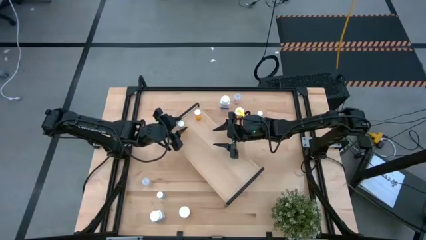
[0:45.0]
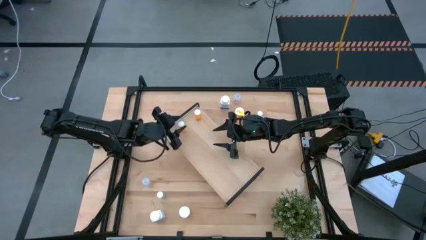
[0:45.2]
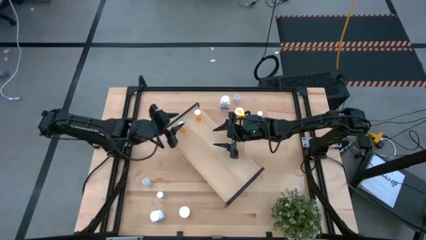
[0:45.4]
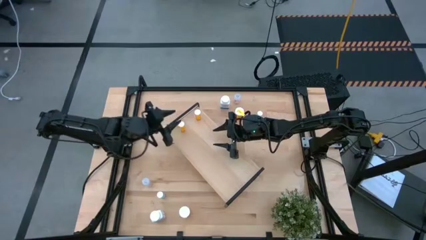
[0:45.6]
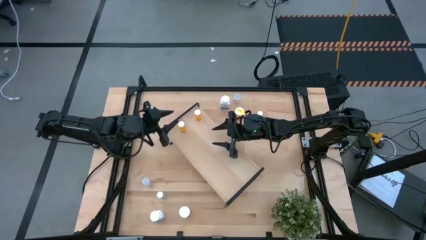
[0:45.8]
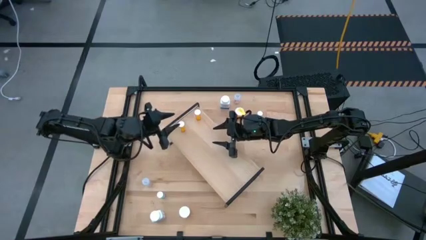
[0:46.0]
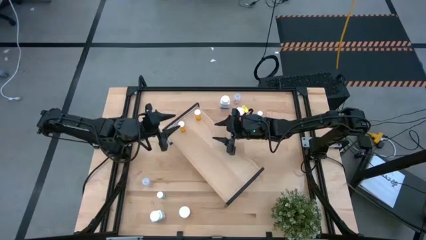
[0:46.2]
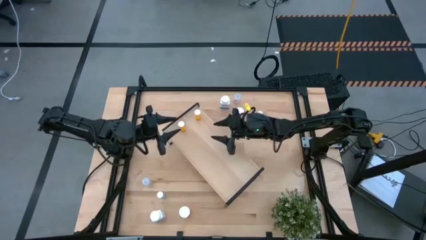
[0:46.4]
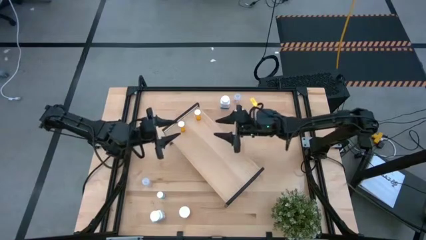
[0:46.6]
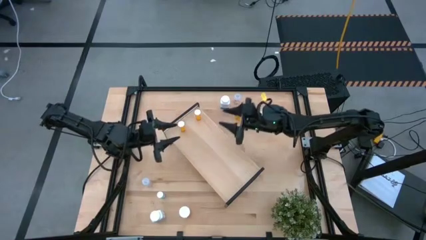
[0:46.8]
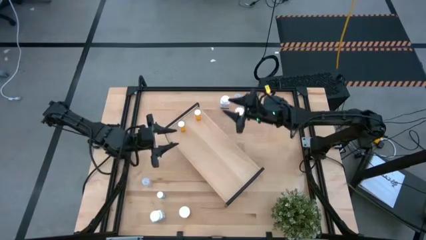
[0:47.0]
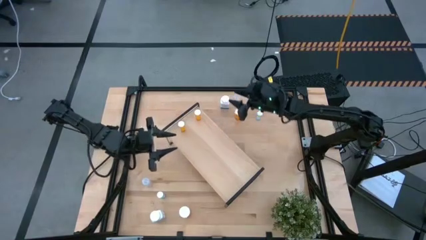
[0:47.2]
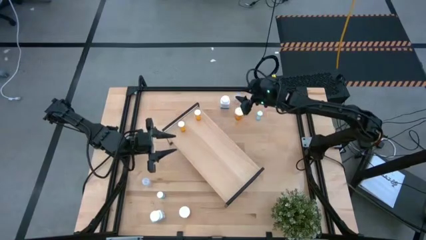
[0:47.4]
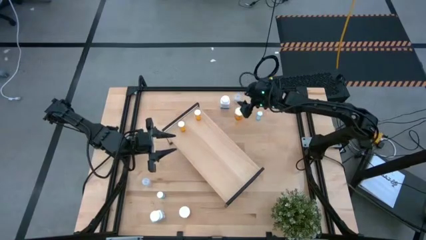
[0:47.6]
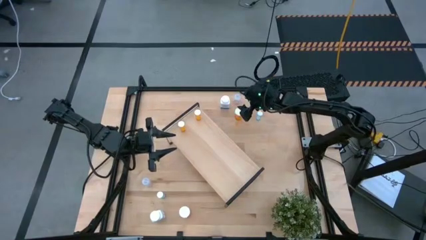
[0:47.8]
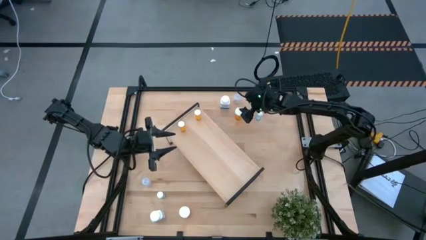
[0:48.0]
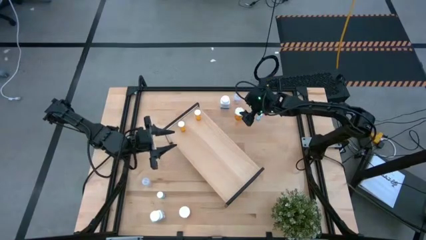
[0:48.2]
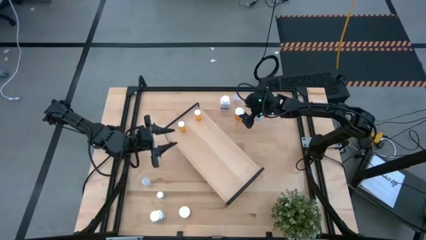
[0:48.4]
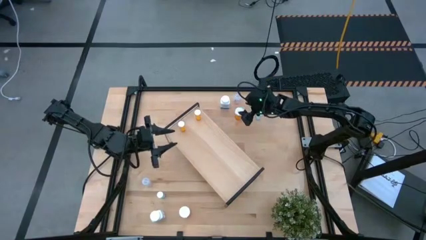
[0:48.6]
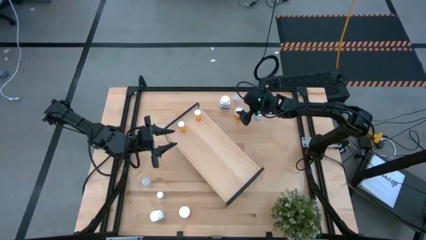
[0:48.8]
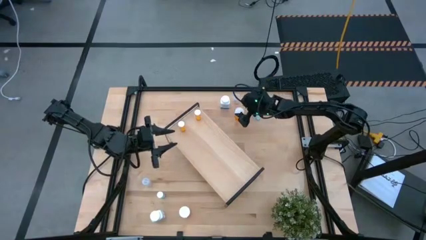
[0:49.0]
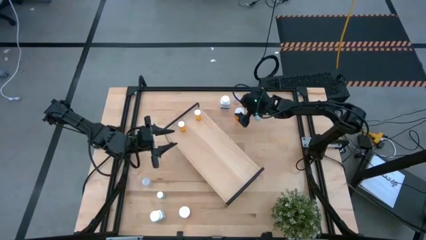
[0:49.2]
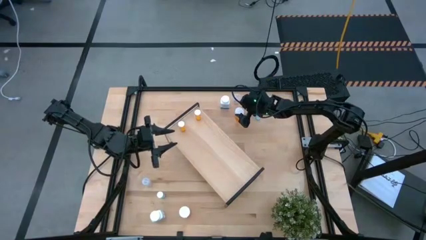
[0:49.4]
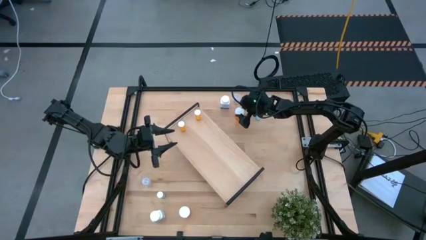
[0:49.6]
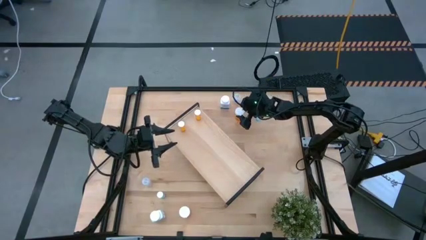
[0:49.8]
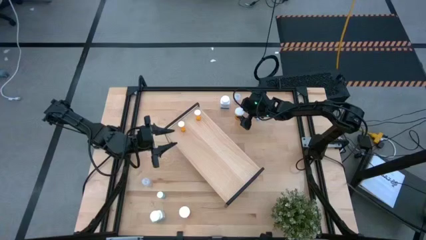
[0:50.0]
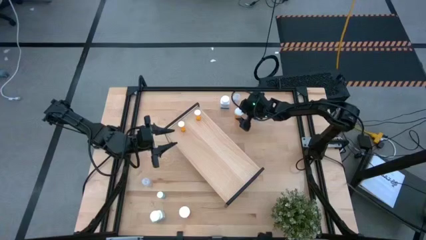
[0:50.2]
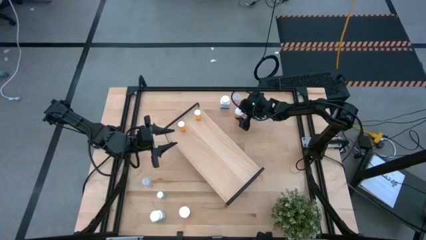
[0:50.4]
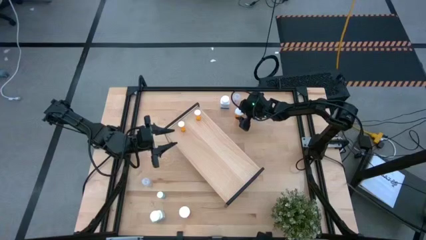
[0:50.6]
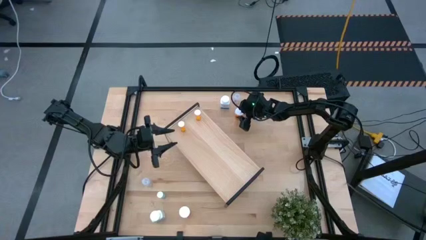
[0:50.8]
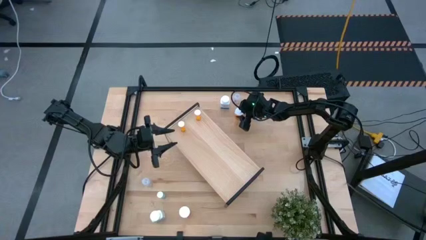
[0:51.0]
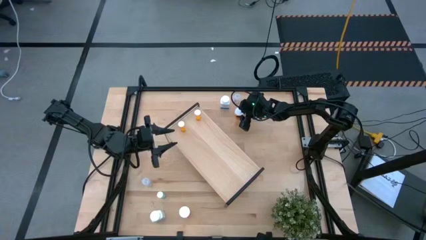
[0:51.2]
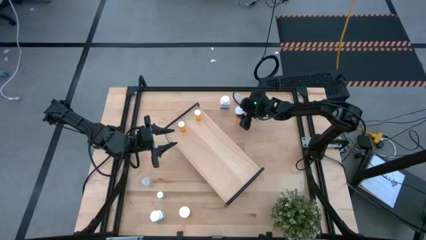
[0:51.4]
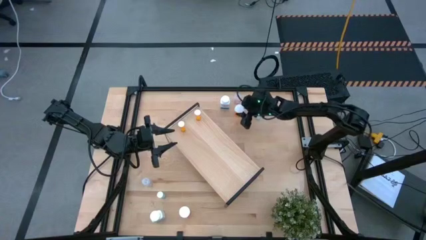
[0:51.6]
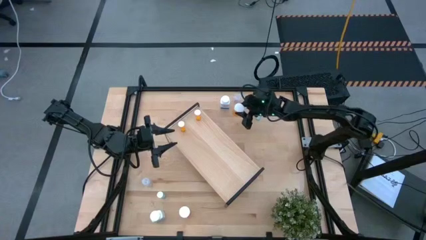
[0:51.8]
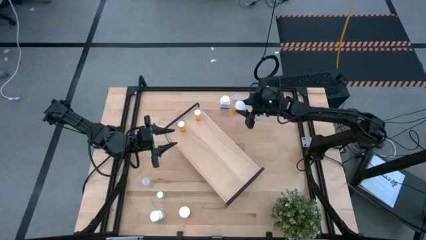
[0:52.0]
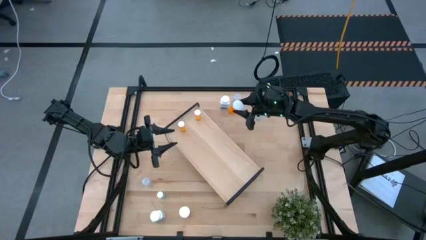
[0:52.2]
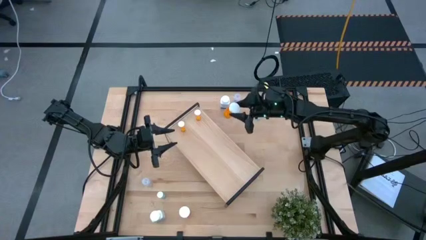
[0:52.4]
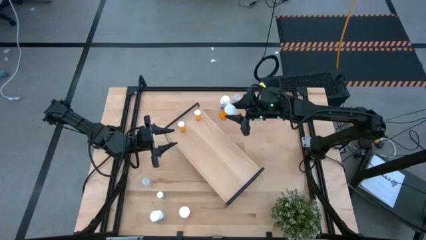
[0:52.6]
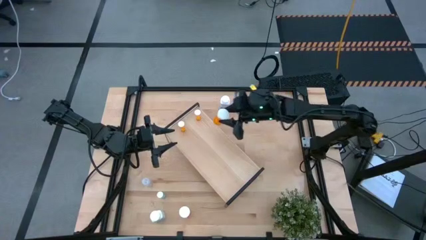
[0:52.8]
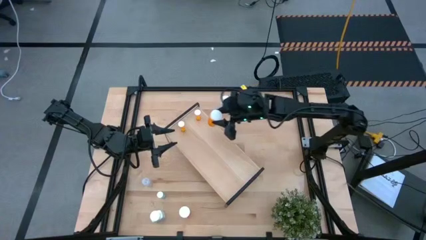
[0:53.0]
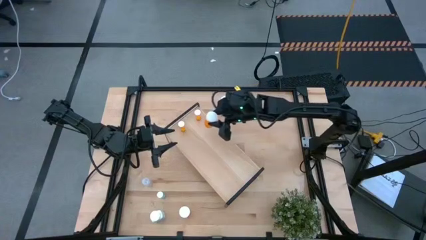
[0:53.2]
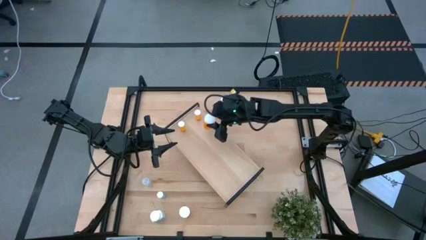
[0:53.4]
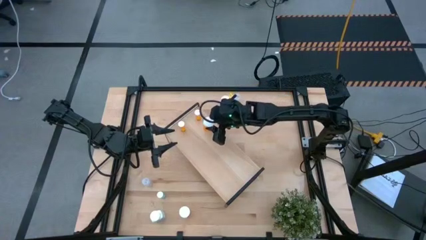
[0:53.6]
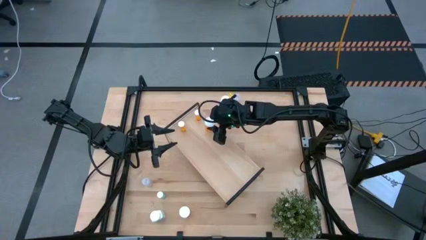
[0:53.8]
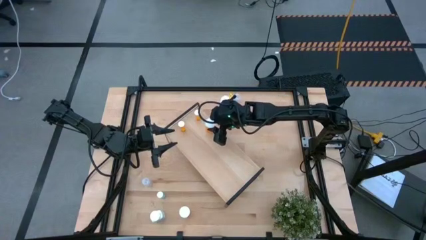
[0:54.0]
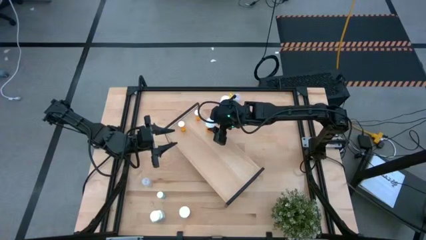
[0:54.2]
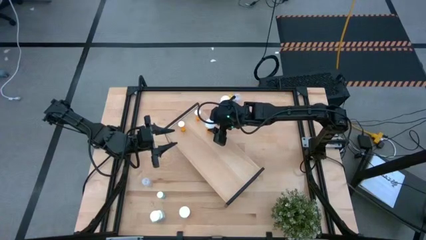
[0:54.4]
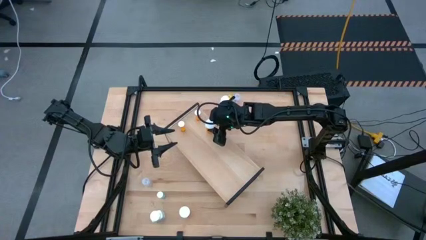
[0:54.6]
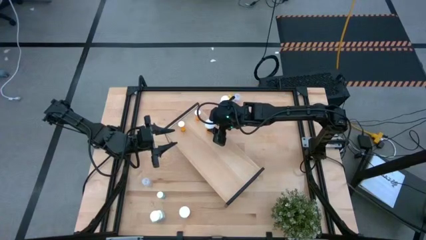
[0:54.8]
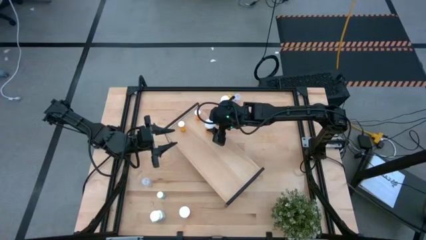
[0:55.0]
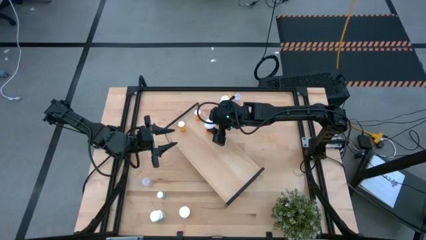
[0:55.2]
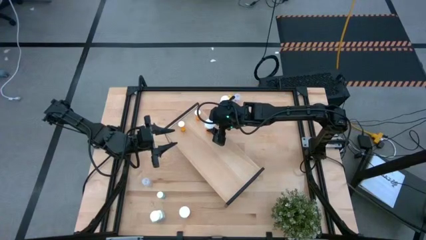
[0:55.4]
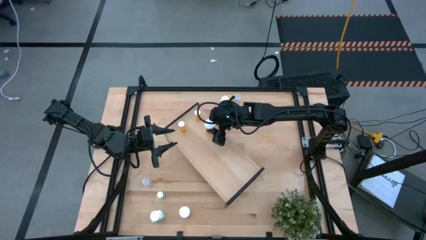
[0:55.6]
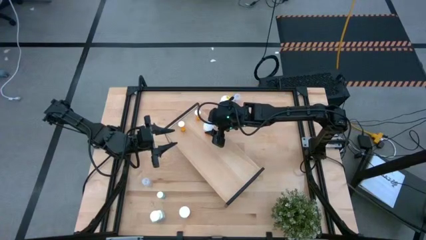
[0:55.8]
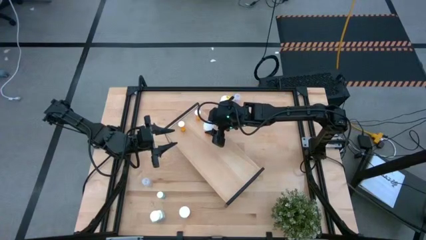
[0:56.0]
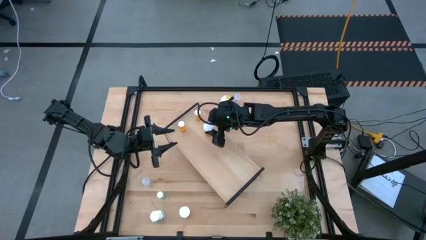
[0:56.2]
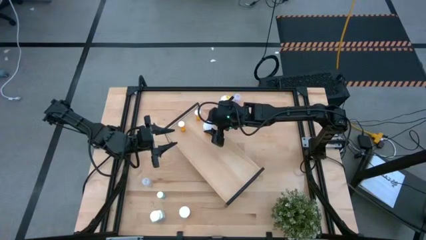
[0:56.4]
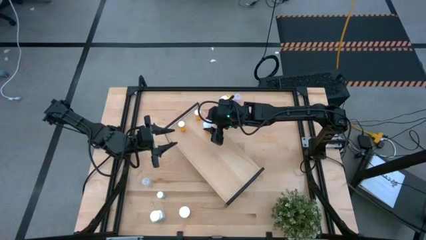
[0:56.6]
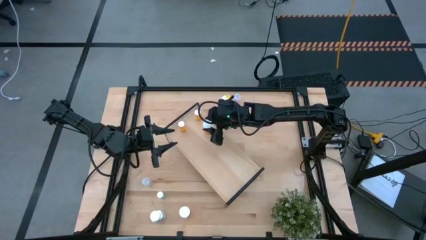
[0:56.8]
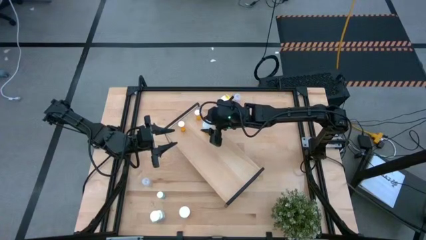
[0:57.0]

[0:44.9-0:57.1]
Task: Pick and place medicine bottles onto shelf by color
Put the top large orange pill bottle on the shelf

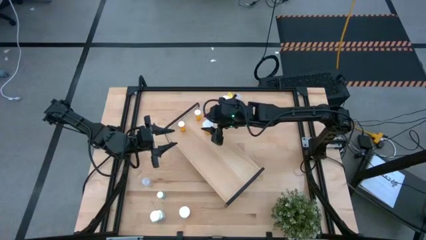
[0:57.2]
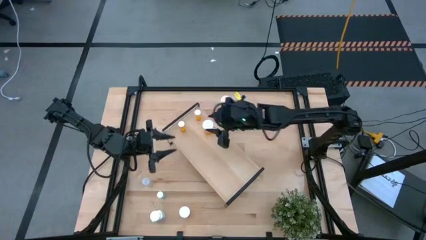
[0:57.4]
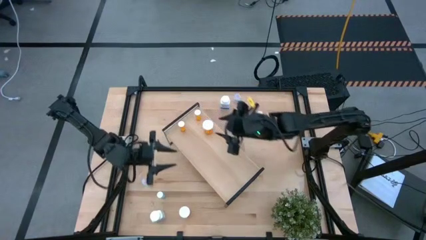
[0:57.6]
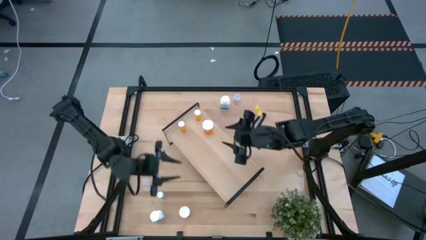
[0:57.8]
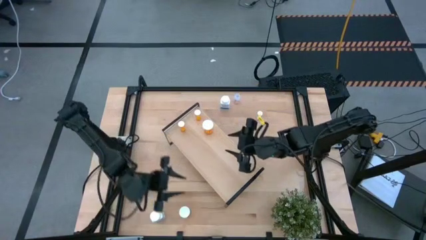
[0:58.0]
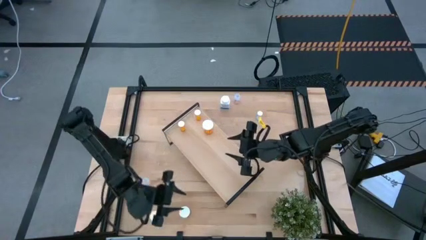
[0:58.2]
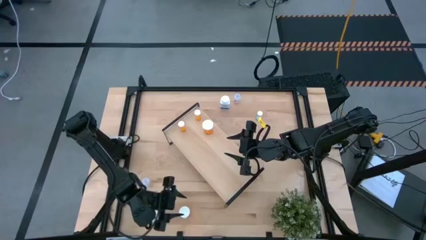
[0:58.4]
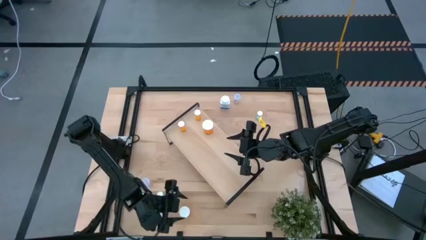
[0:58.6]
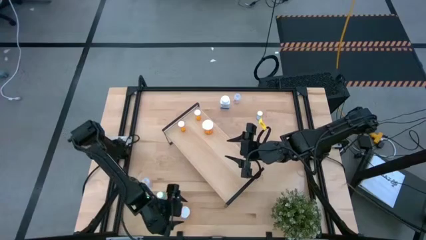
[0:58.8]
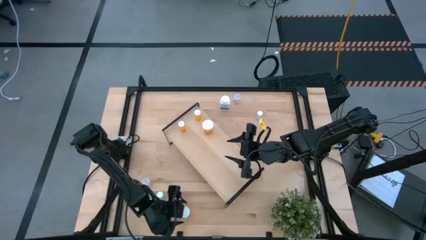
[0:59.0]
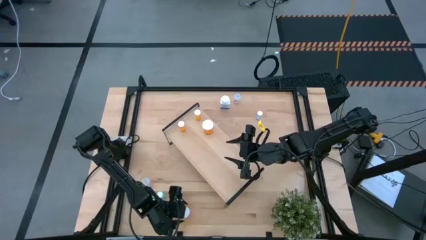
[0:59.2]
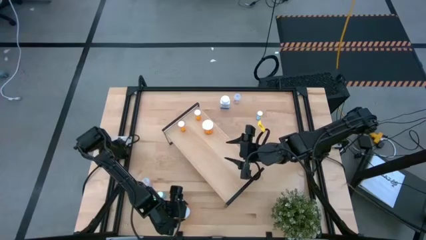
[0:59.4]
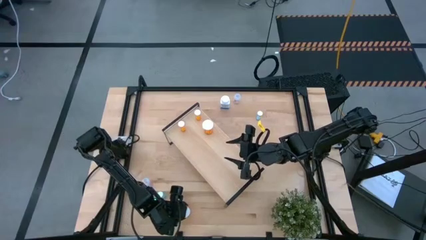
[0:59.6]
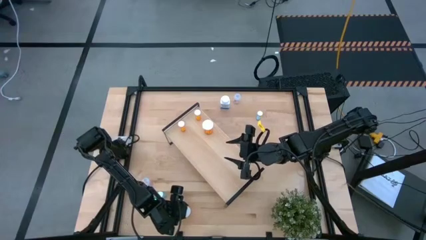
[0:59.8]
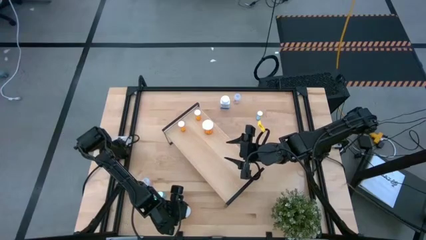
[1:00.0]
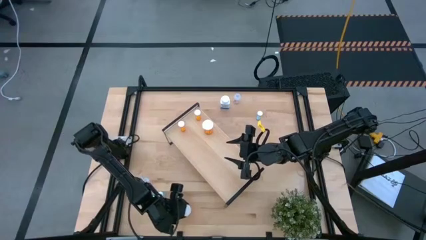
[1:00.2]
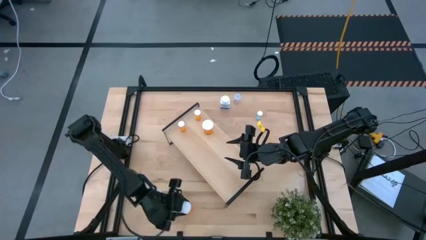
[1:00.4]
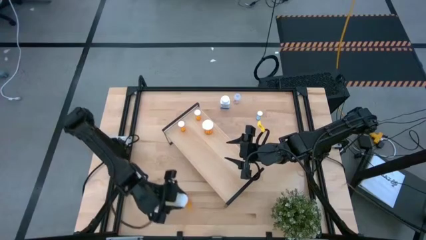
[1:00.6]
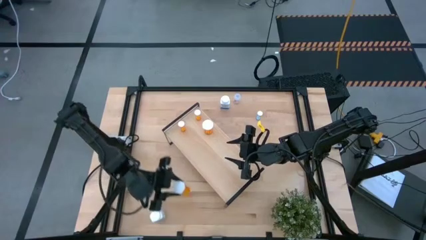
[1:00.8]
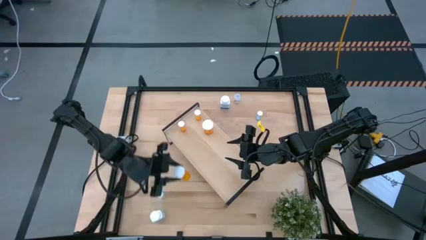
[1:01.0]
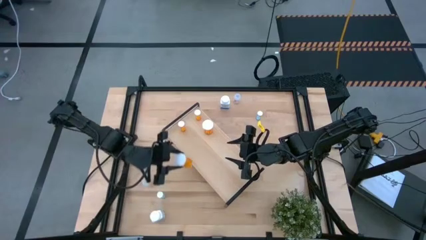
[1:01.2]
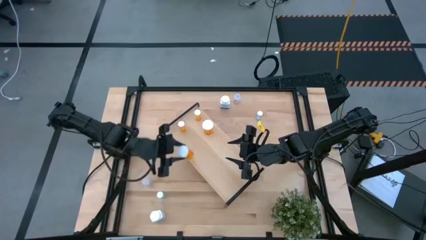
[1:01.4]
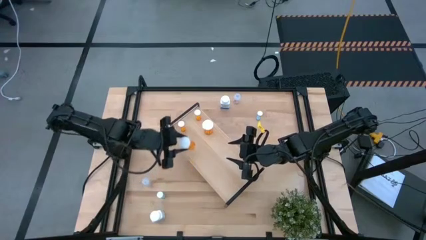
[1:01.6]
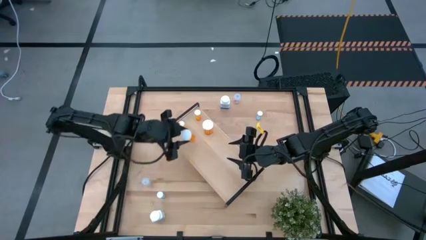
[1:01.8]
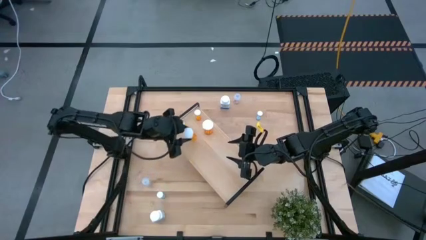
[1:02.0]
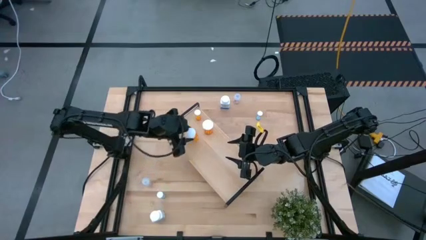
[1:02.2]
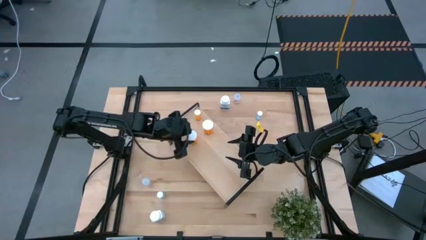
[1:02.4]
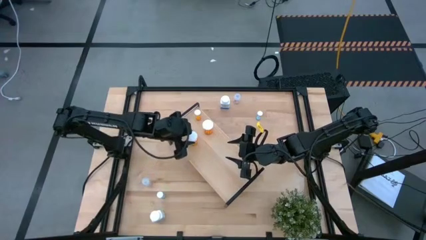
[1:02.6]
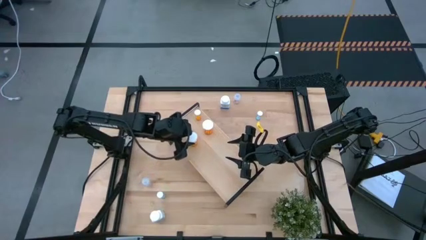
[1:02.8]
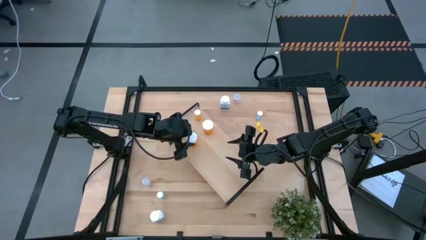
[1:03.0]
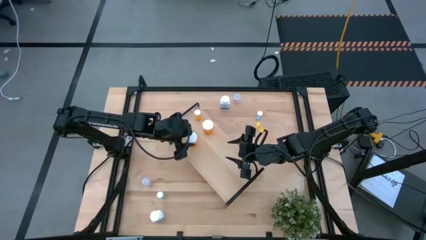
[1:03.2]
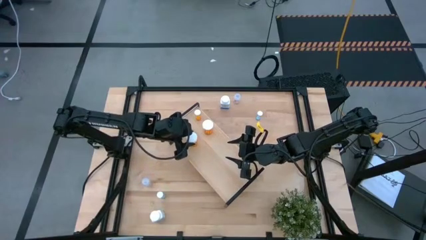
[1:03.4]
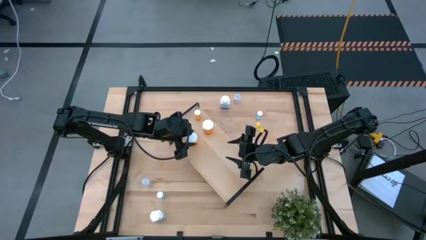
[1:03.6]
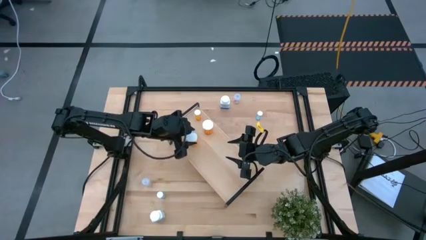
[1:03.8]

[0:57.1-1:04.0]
Put the large orange pill bottle on the shelf aligned with the large orange pill bottle
